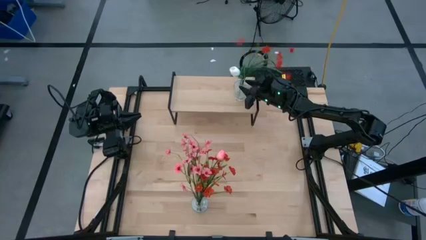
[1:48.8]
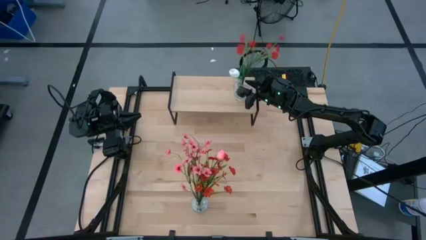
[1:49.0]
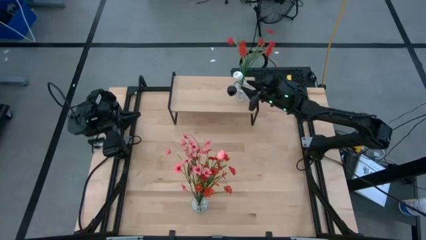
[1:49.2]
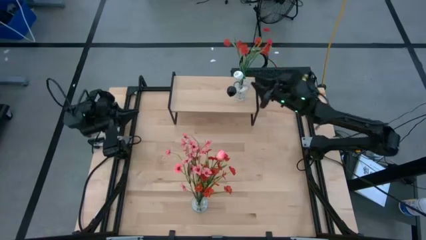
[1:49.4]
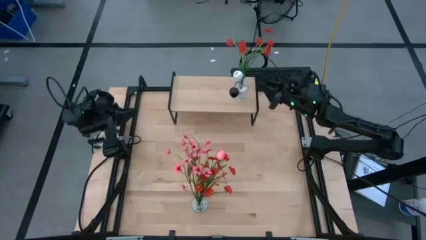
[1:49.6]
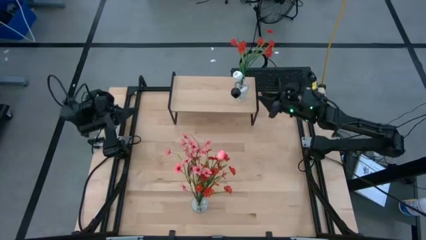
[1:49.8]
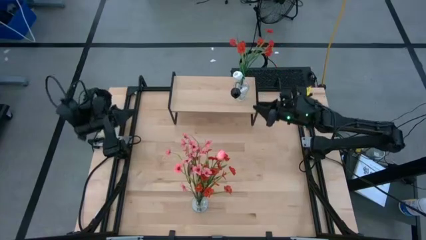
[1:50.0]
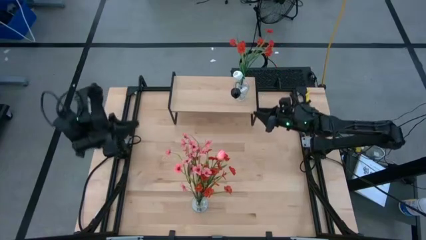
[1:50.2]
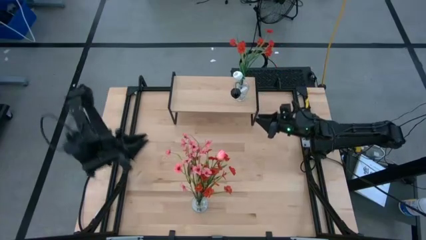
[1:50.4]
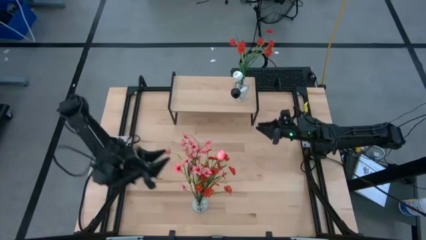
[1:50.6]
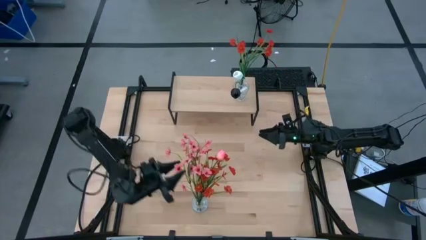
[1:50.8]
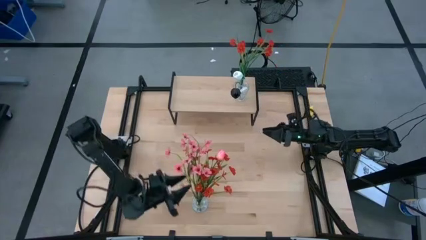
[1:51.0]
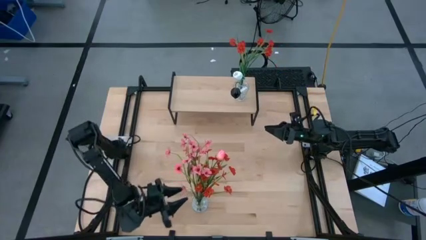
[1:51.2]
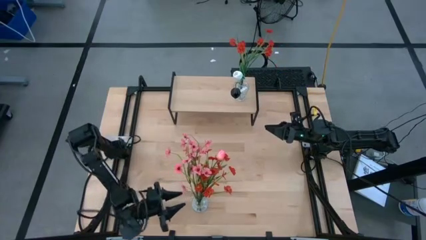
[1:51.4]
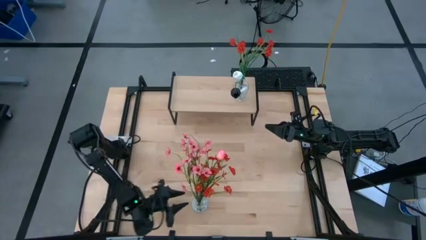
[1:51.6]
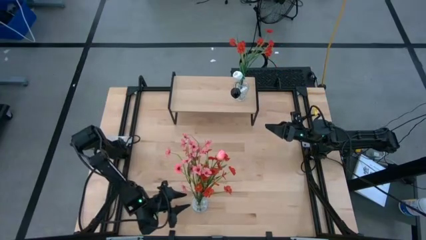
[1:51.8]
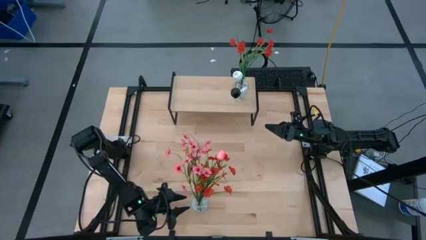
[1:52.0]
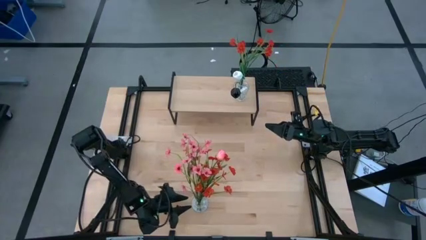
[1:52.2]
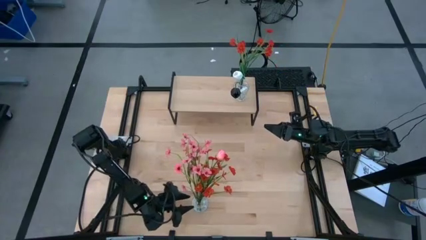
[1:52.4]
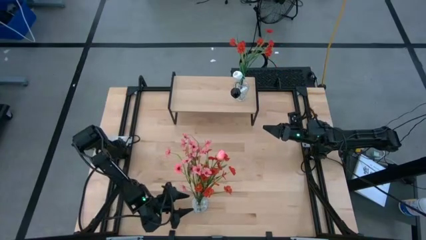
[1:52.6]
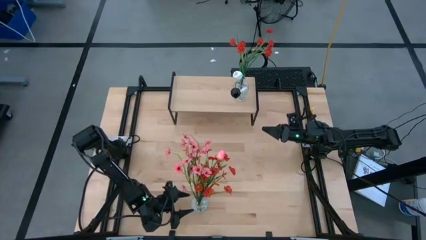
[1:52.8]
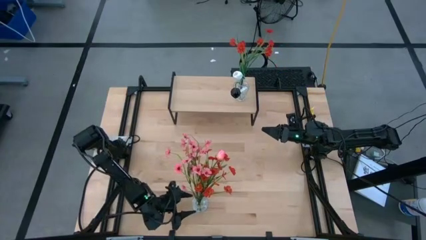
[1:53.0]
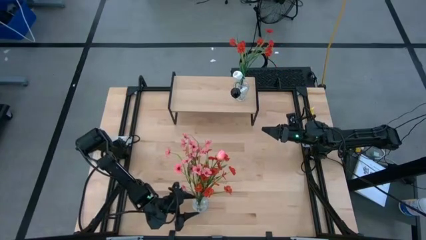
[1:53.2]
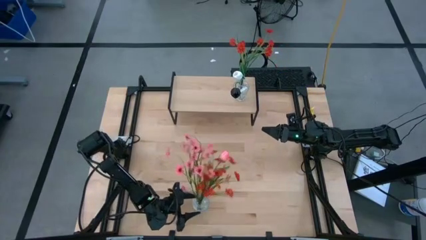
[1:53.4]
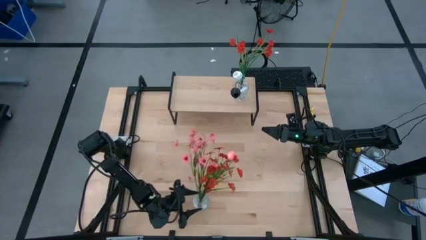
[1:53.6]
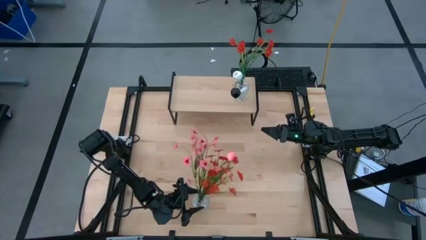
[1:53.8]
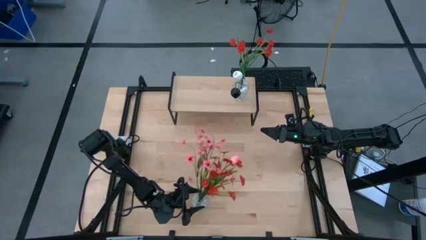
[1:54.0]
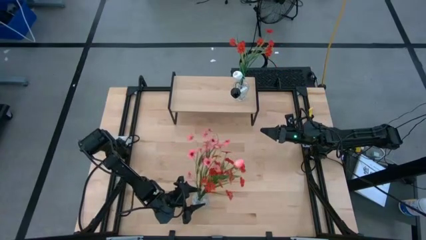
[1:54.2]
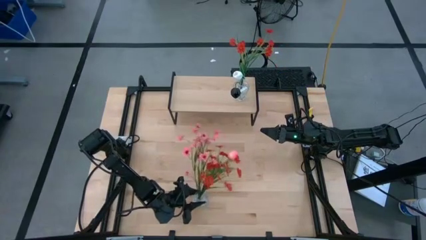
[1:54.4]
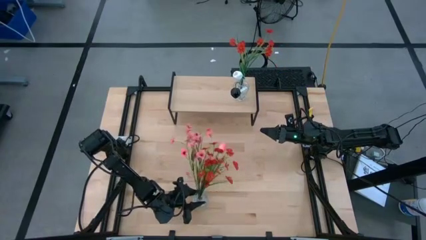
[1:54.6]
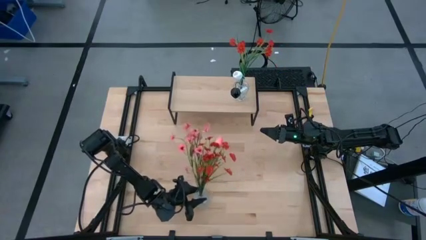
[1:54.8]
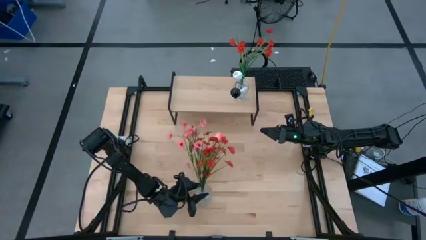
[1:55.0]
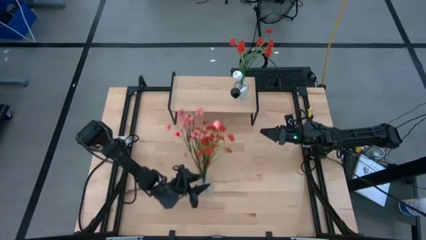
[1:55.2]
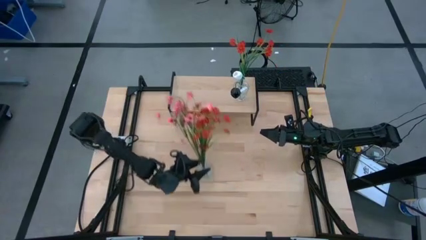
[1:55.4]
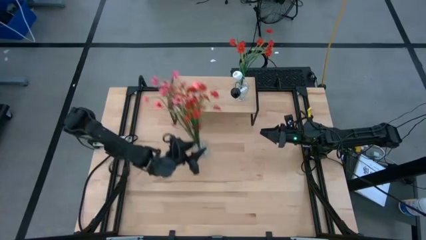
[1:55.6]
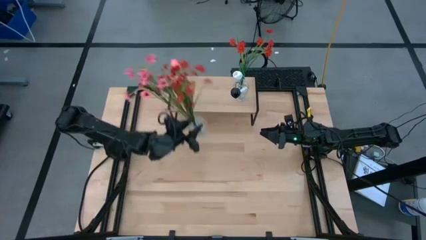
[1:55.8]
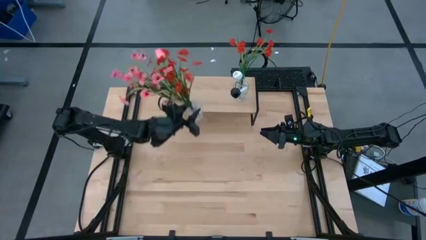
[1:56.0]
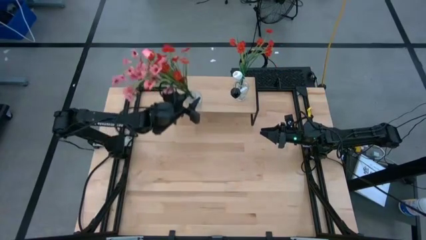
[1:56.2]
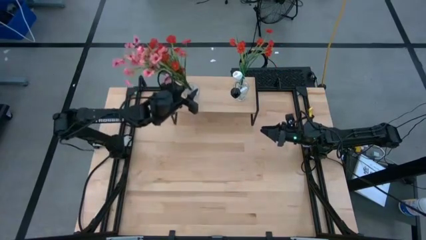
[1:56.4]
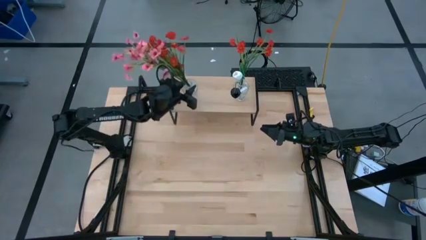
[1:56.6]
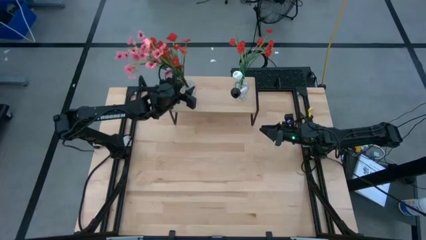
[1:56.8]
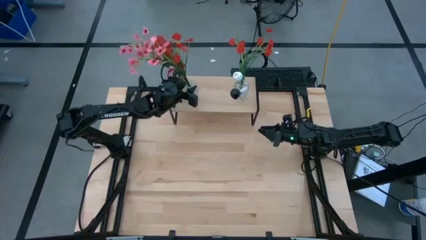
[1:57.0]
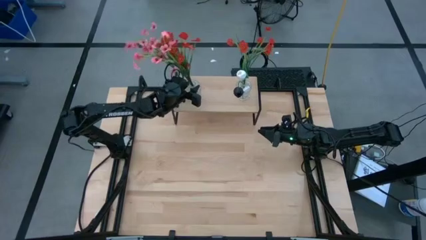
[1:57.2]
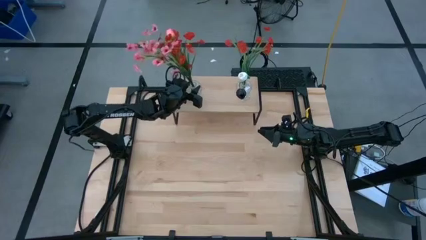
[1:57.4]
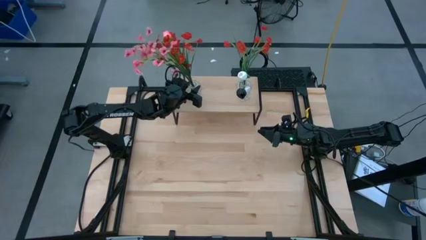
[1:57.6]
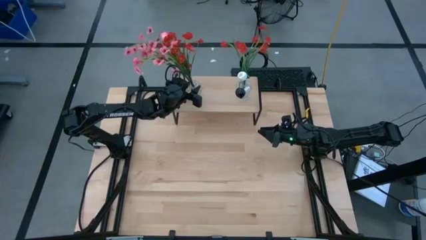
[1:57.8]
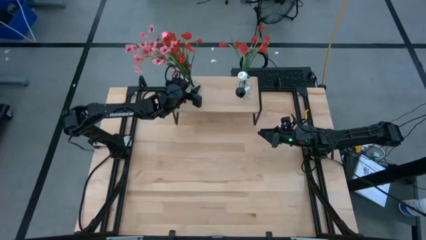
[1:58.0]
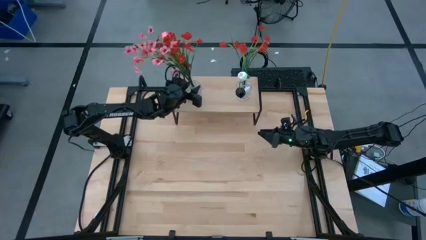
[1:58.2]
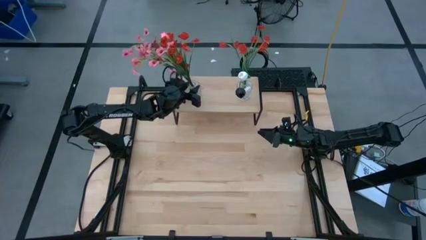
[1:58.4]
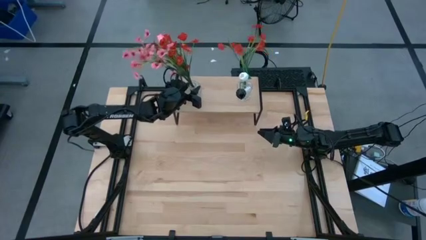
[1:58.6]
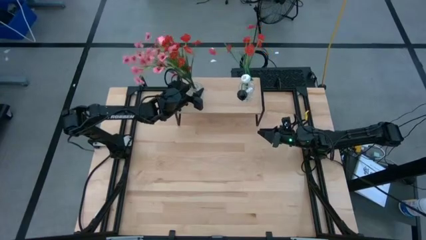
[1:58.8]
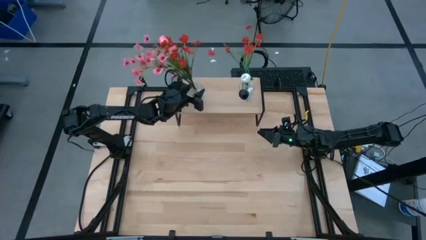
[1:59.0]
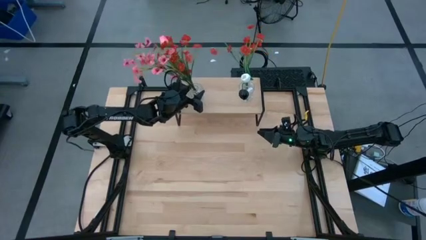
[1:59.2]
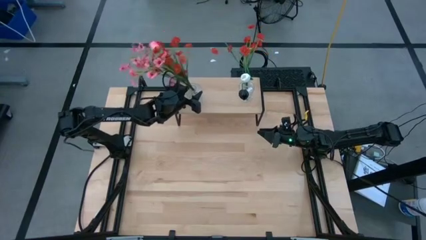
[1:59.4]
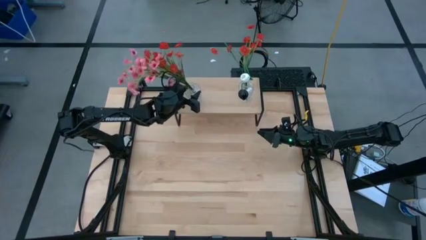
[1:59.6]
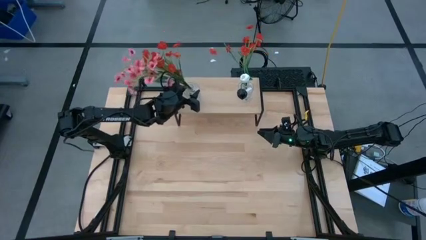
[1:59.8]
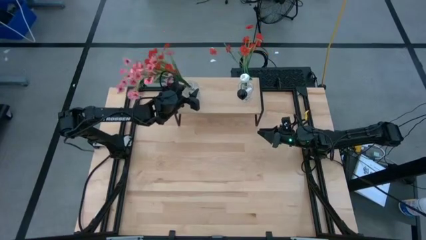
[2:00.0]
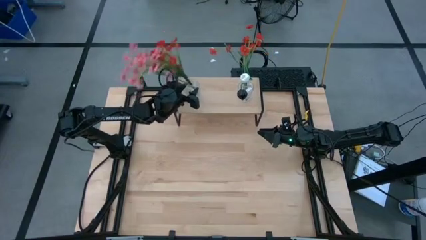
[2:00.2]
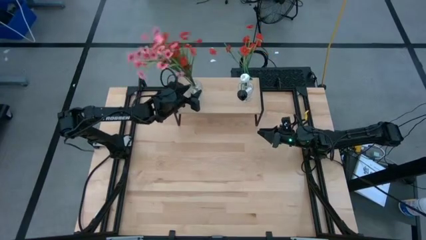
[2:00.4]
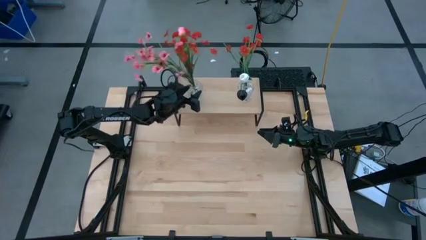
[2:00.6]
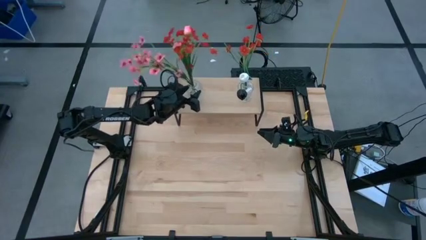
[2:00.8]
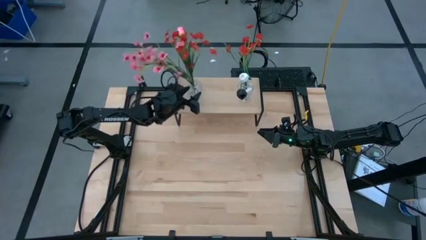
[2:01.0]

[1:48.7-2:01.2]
Task: Pick and place flowers into a vace then onto a shelf
Put the transparent vase with flowers on the shelf

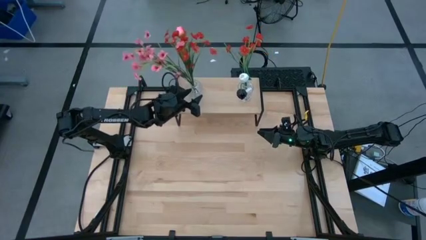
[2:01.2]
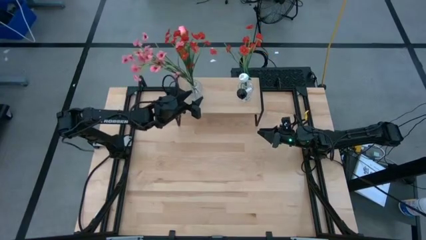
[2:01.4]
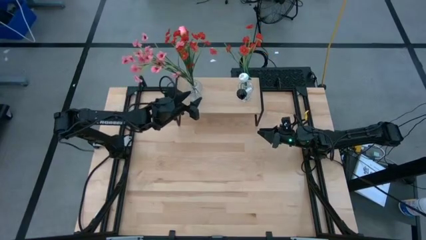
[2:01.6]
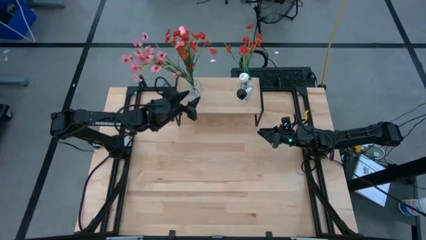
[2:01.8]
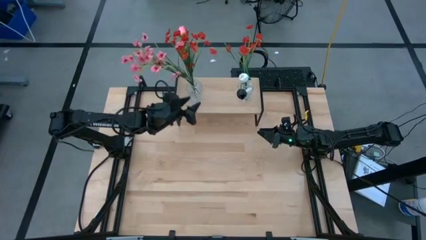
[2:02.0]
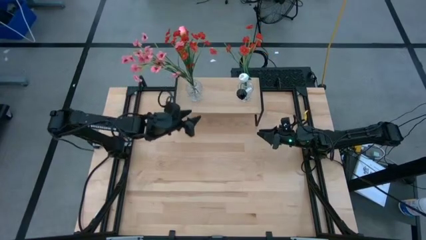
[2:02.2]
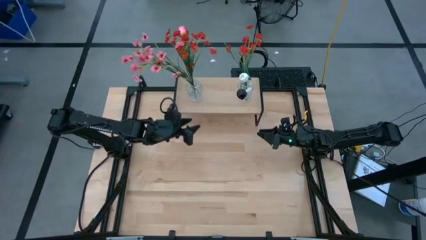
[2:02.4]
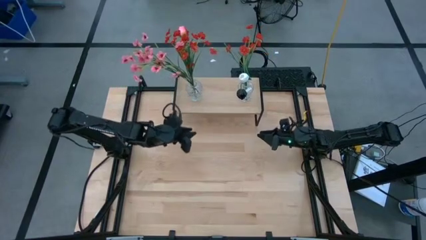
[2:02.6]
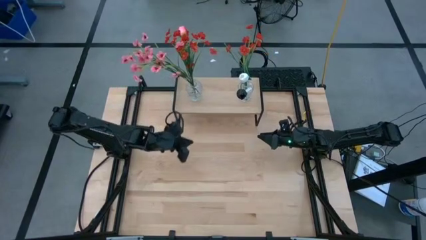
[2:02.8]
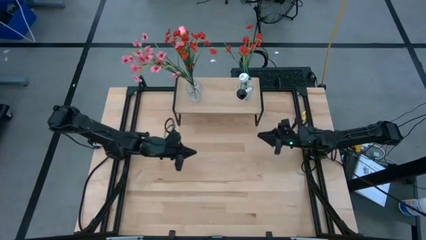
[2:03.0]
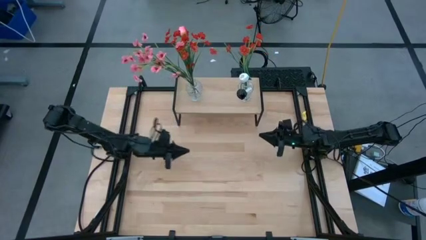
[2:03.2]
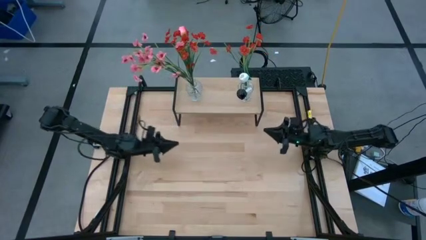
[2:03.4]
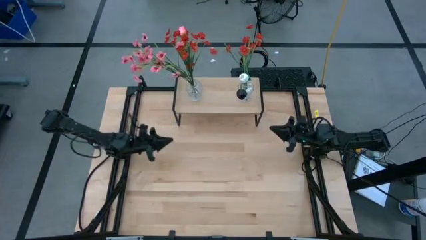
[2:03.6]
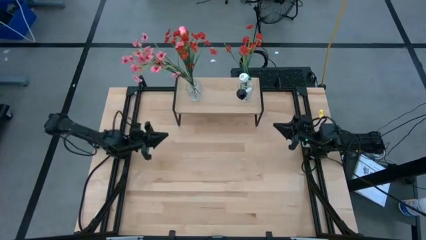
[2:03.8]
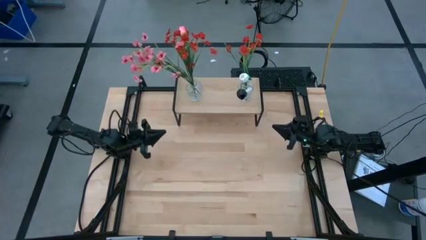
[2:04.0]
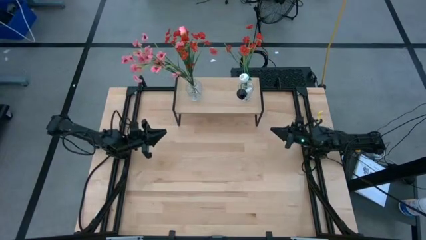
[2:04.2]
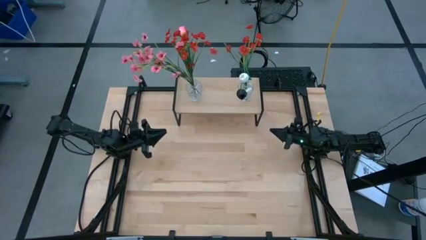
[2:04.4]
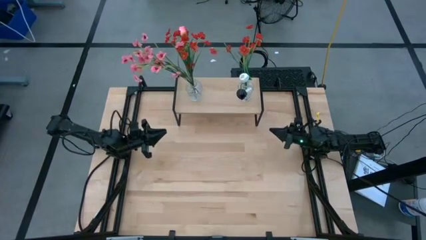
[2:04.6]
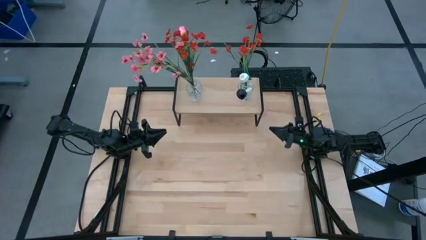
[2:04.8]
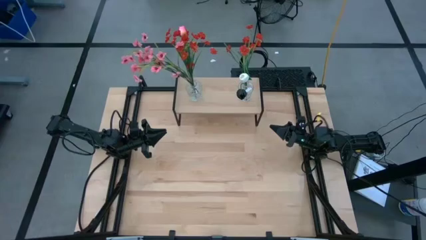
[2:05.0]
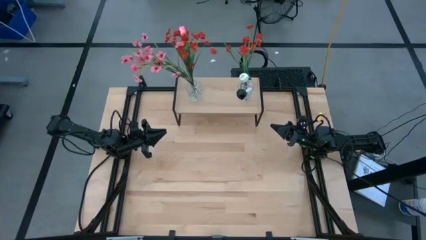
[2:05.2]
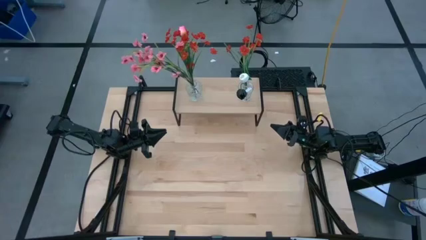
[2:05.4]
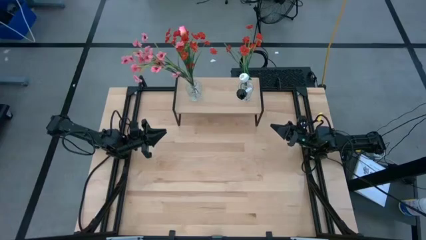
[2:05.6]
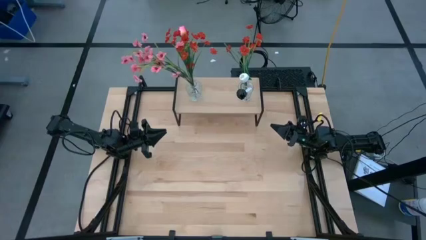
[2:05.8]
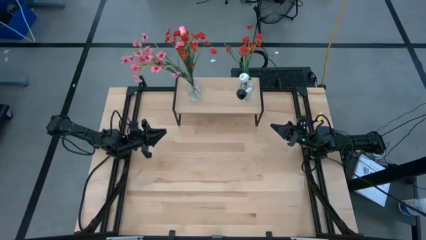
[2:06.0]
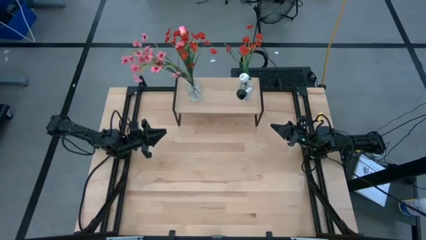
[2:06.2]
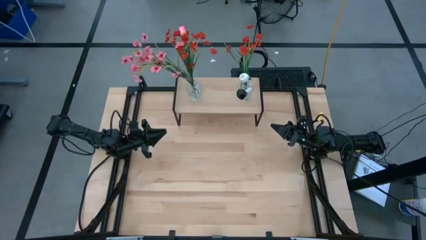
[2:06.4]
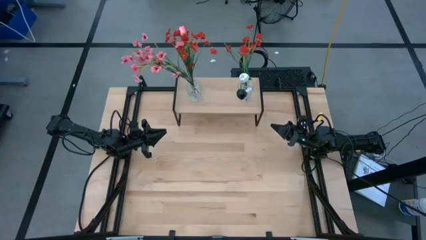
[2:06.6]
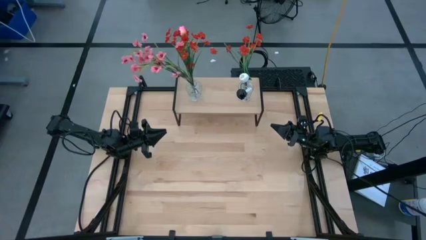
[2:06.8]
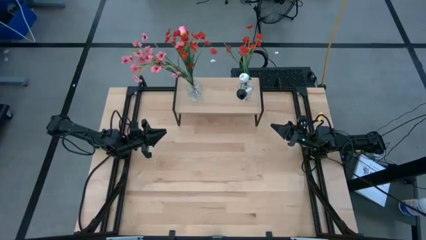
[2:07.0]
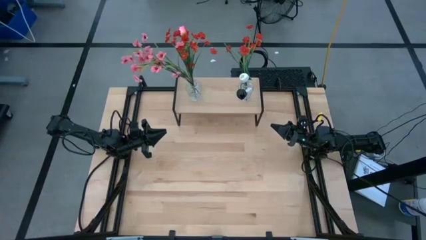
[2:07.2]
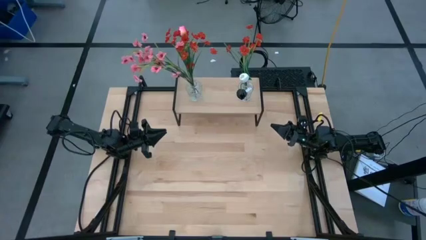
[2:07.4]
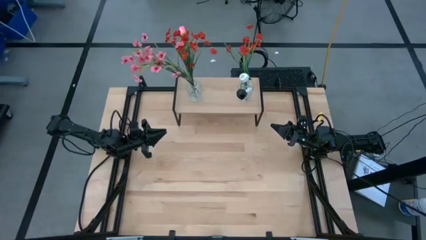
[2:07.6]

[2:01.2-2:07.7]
Return to Home Position
